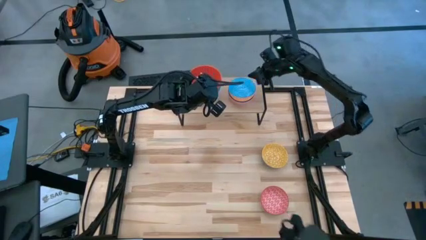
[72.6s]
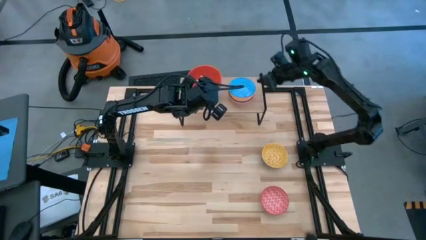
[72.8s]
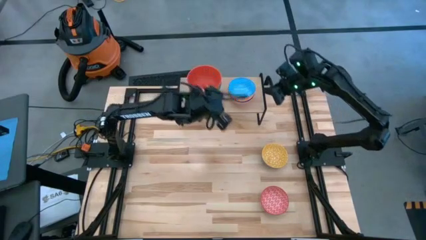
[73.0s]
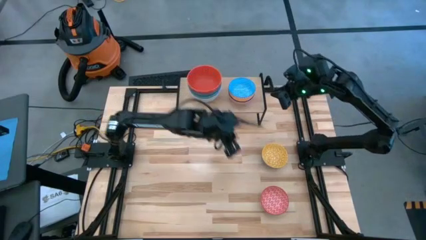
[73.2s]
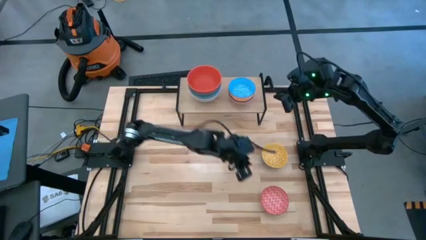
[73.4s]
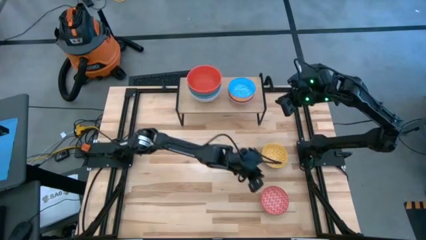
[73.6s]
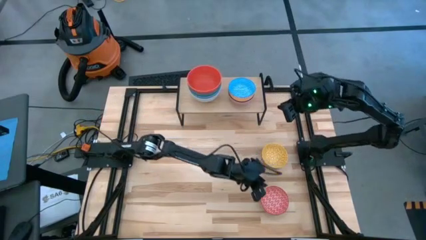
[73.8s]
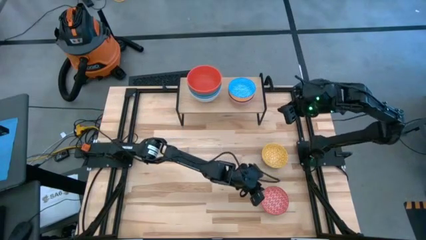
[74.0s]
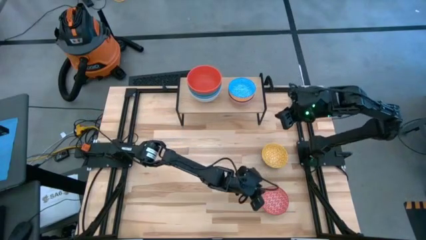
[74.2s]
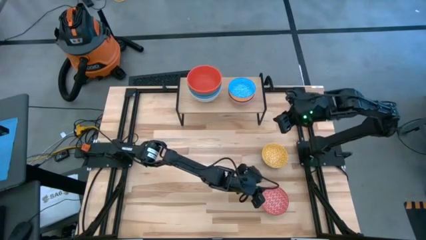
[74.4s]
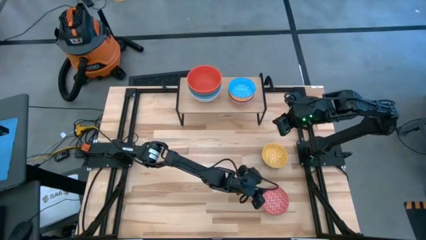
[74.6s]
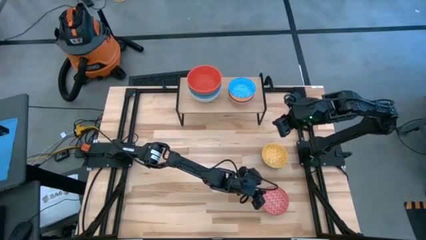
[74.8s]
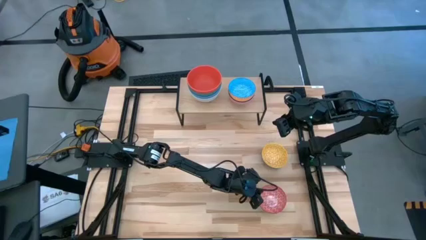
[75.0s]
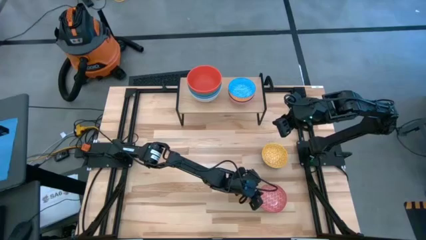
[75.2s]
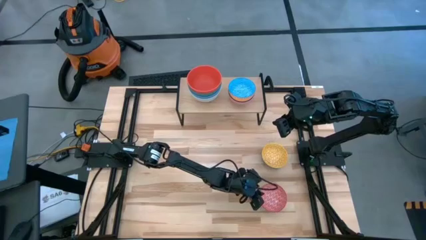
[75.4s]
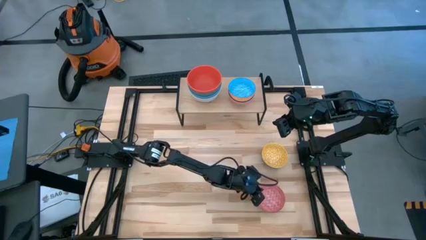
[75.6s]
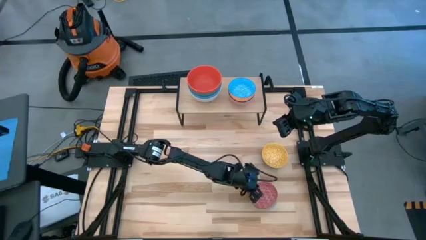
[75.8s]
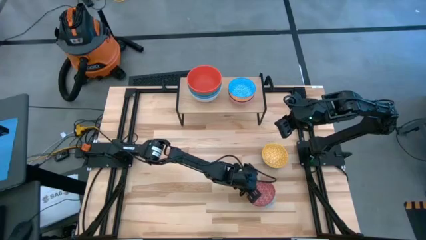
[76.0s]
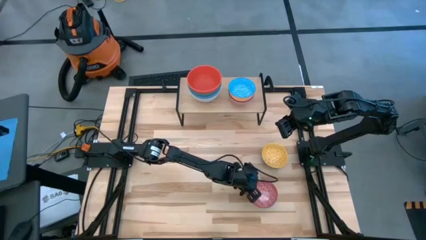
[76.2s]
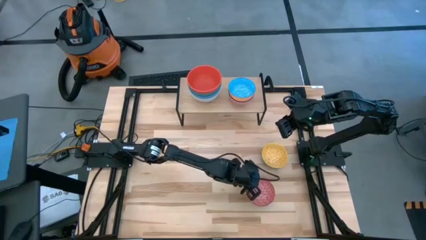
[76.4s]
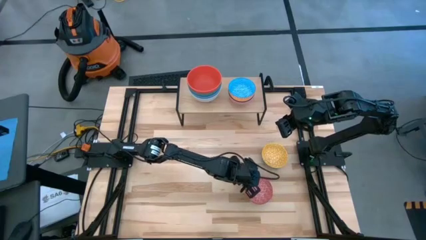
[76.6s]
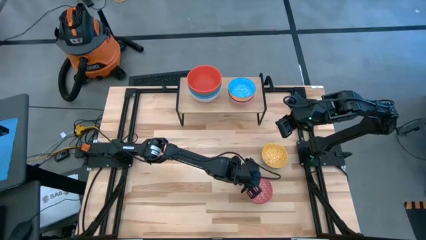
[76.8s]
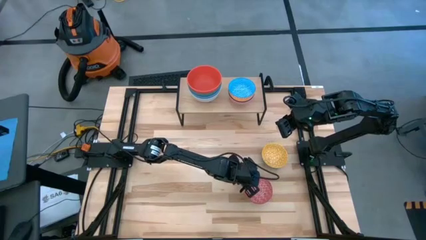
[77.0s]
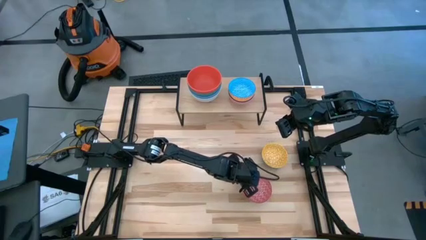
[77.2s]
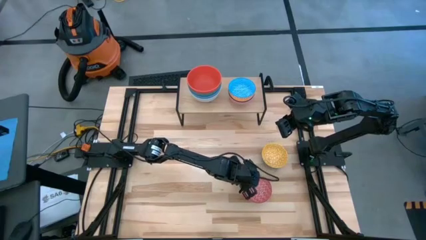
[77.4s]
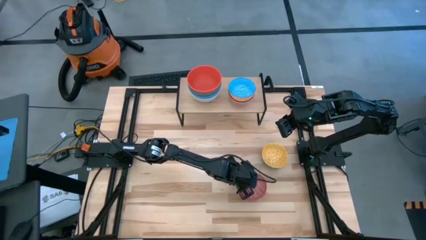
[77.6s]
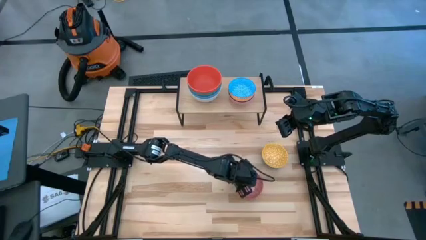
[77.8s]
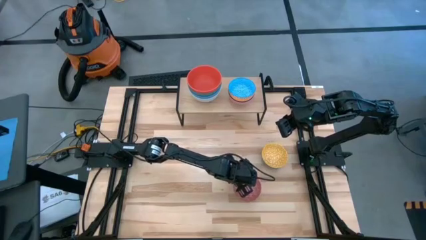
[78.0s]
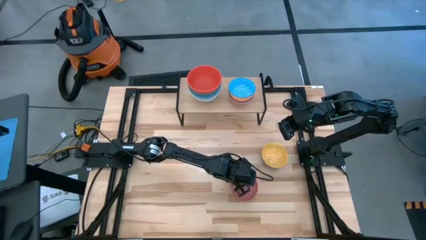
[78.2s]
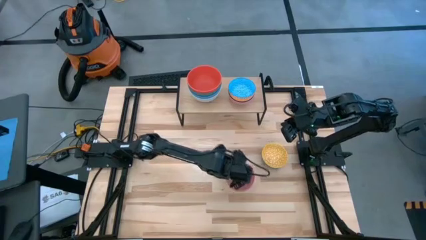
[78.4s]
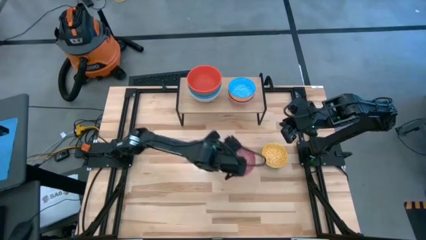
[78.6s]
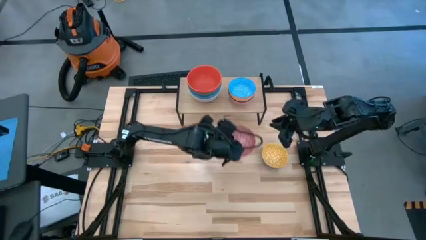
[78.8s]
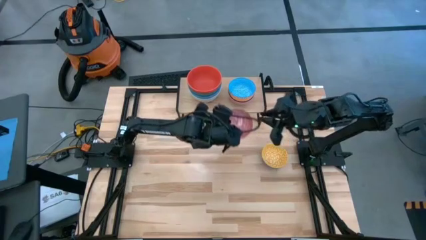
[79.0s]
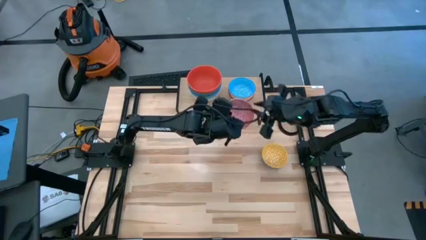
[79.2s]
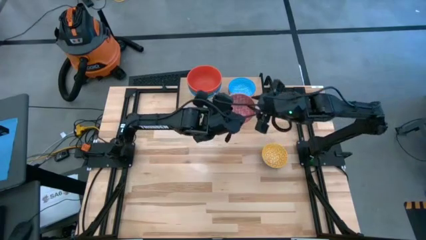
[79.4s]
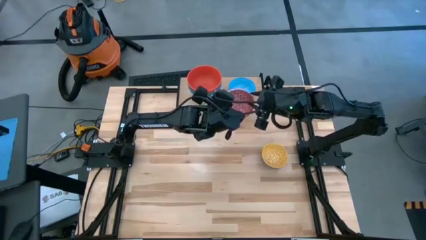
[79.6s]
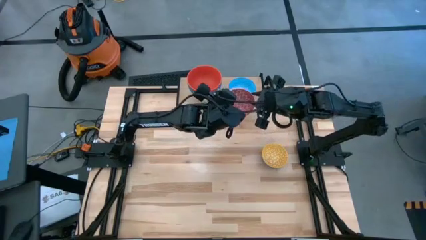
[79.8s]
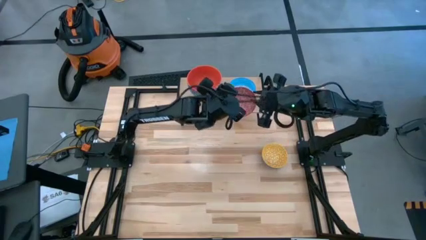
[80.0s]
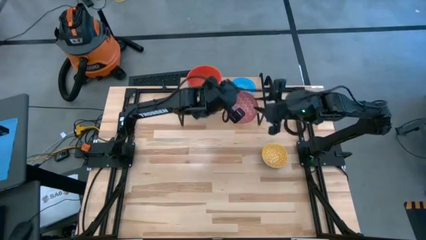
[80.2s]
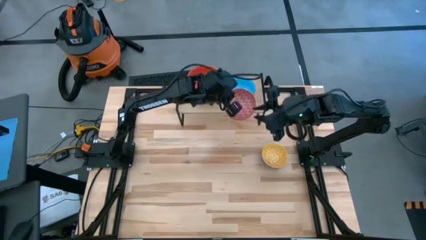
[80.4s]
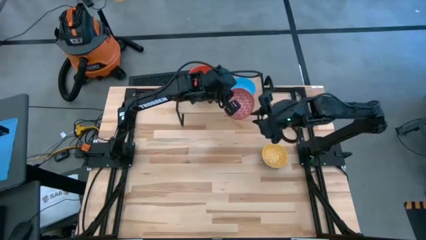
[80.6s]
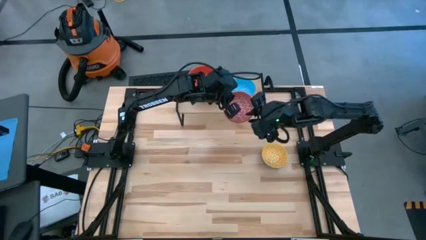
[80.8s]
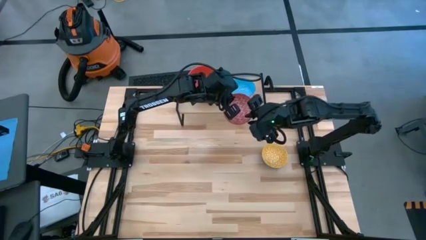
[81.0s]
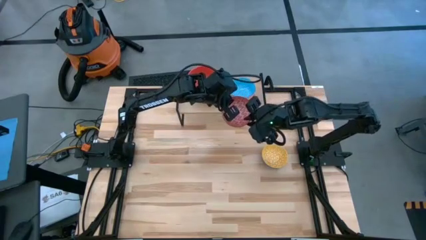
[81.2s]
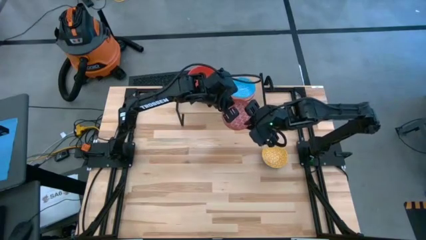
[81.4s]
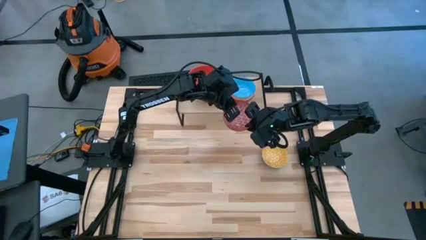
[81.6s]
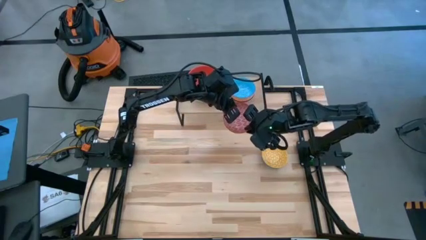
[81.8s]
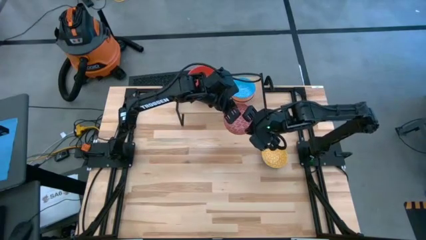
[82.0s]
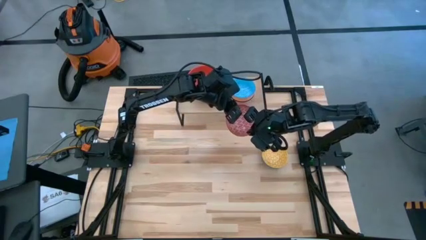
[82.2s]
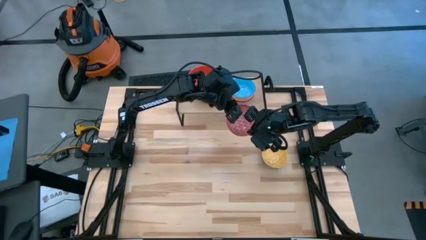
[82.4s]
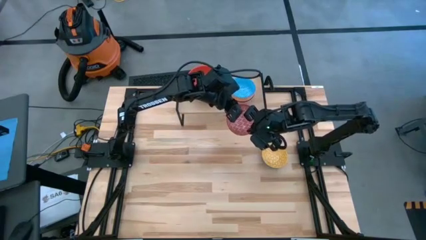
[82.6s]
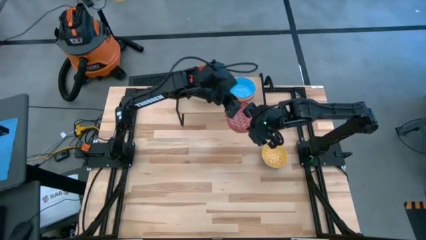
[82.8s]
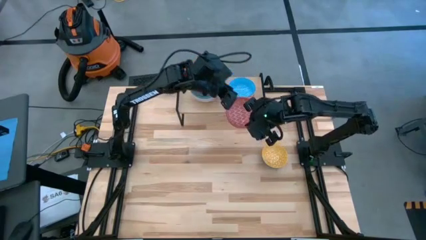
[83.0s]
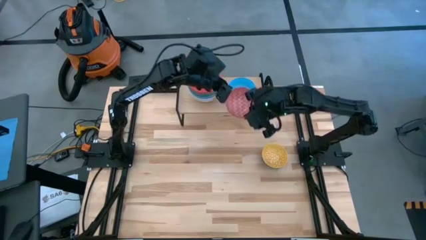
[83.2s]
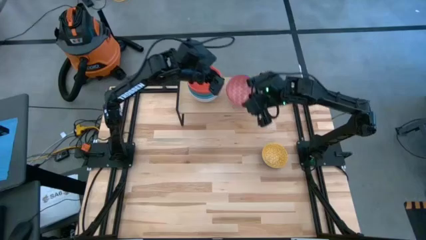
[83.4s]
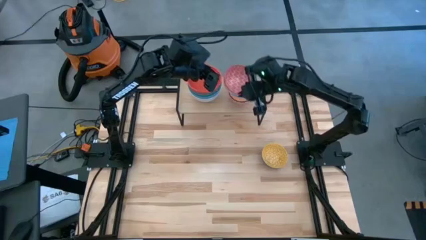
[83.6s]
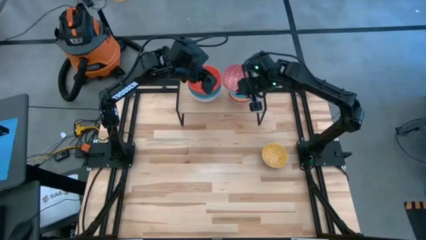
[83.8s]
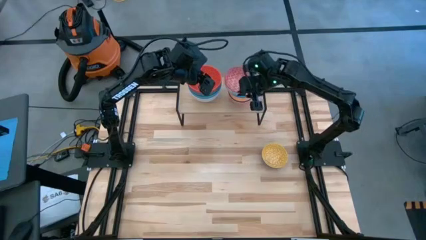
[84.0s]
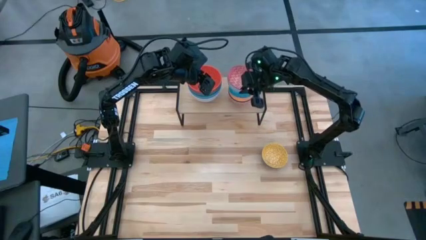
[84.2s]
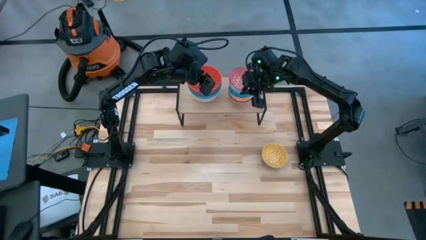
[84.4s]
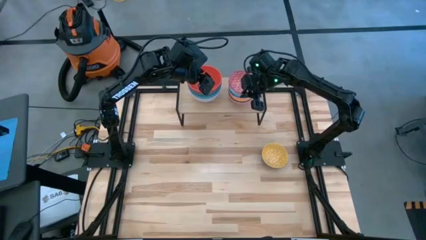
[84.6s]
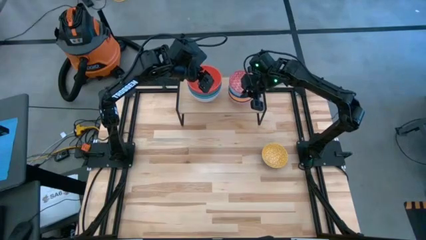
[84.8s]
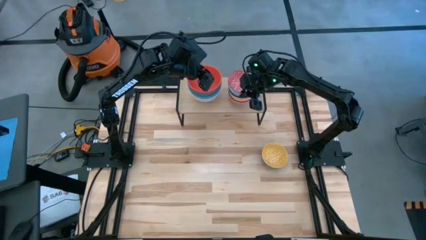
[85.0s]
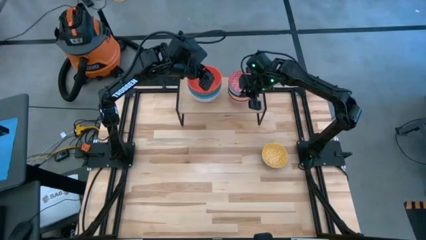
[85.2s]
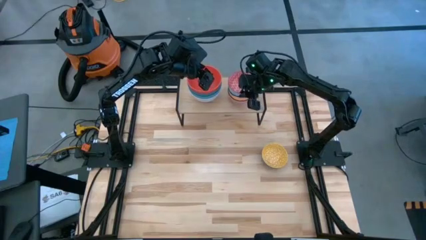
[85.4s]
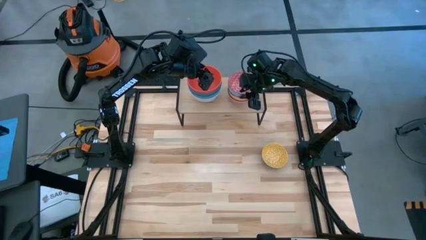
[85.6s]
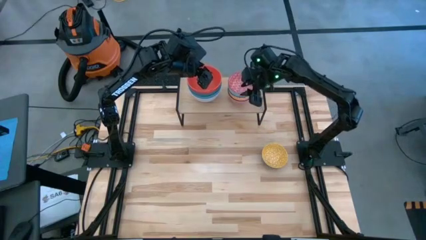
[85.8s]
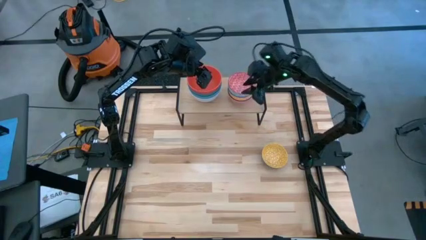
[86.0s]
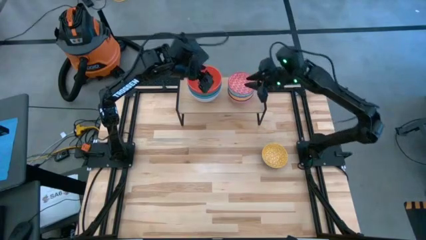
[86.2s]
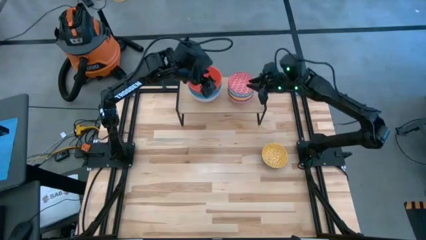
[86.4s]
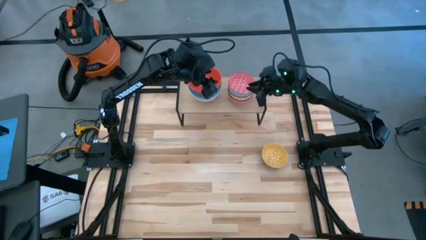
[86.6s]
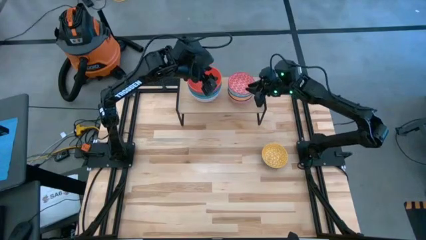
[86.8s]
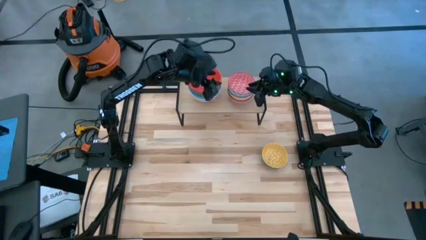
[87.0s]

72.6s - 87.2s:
Task: Place and stack bowls onto a shelf
Stack the red bowl on top of the light blue patterned bowl on the shelf

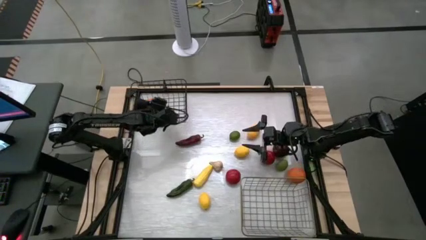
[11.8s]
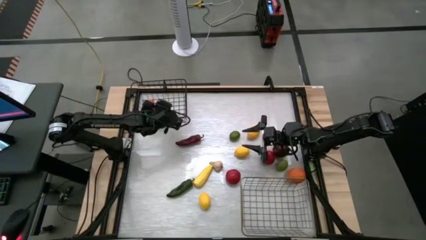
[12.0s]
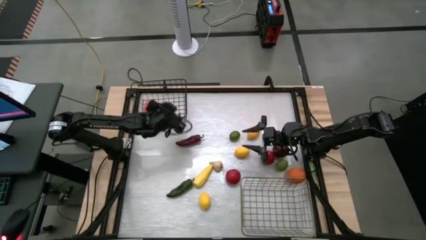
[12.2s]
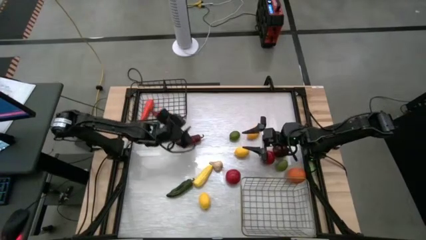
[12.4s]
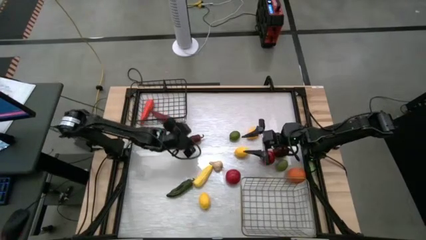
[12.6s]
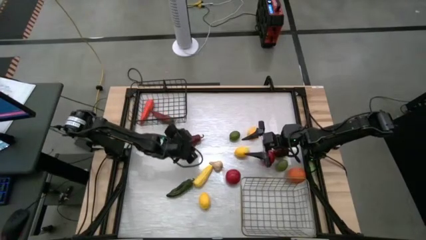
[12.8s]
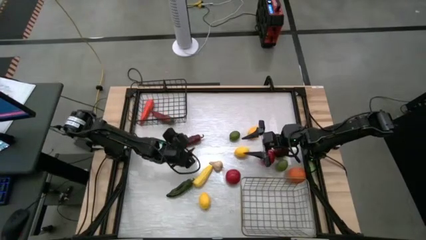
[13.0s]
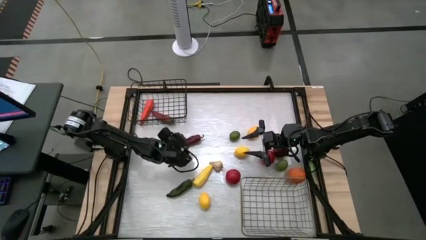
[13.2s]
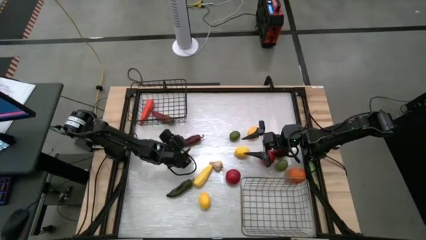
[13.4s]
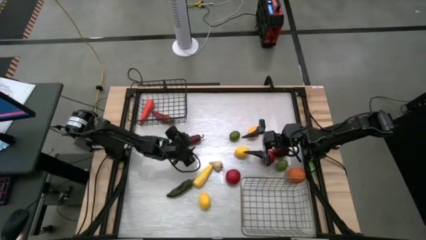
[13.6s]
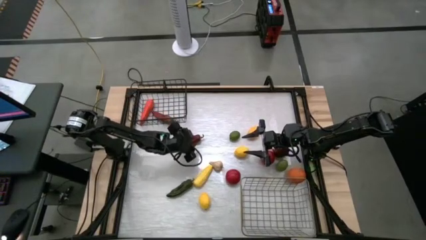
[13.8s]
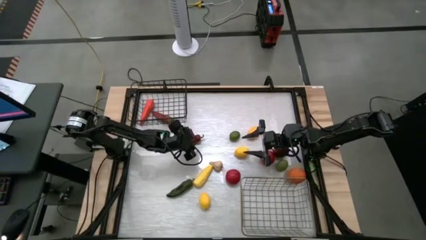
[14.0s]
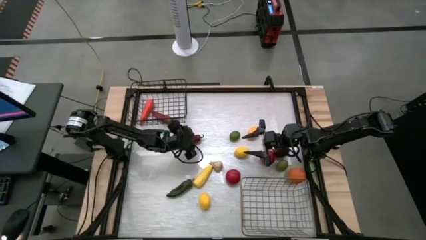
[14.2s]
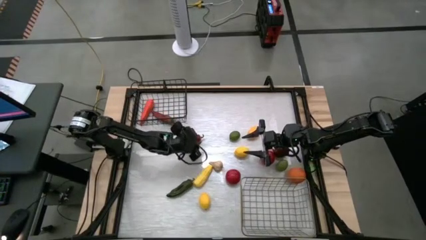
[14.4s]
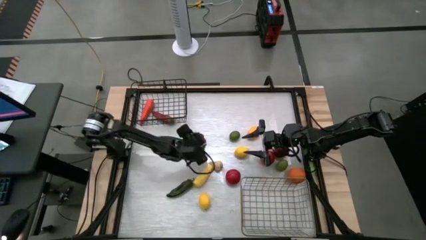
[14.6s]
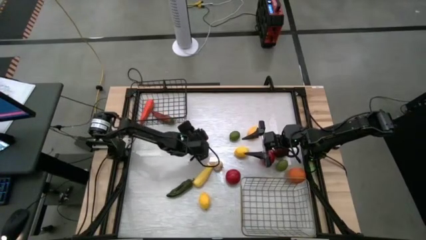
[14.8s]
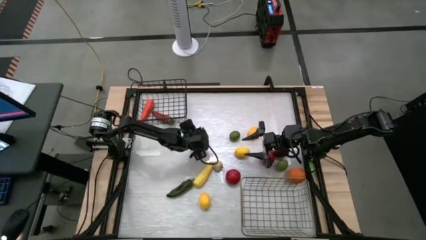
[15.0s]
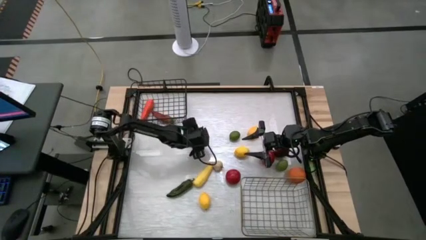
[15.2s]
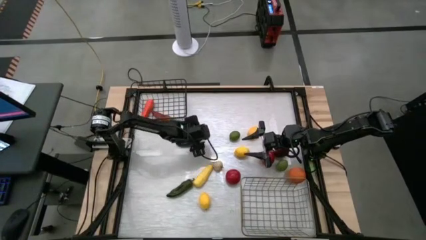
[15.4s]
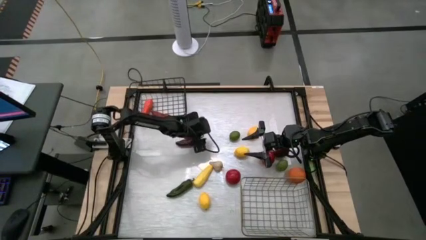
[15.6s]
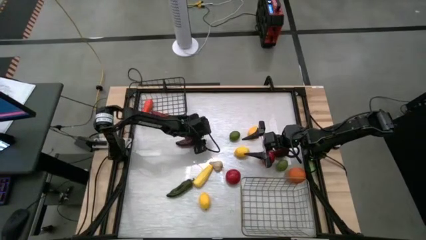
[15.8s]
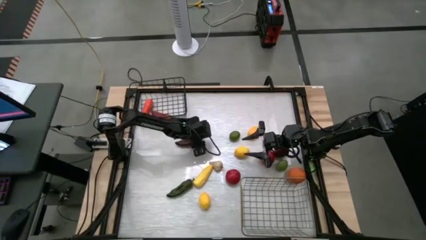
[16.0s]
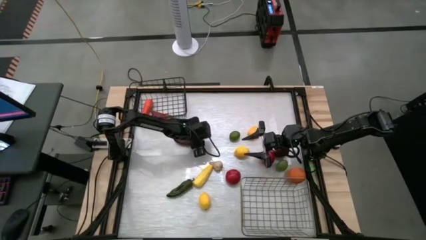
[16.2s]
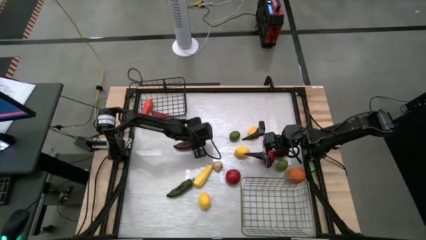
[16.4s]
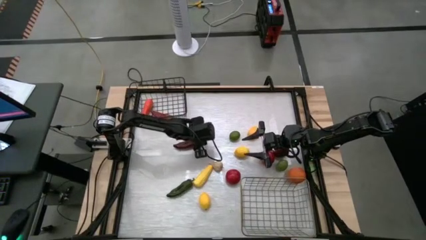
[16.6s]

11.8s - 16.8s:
Task: Sort produce into baskets
Put the red bell pepper into the black wire basket
